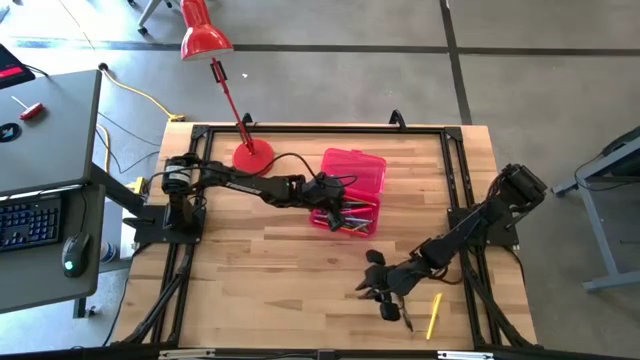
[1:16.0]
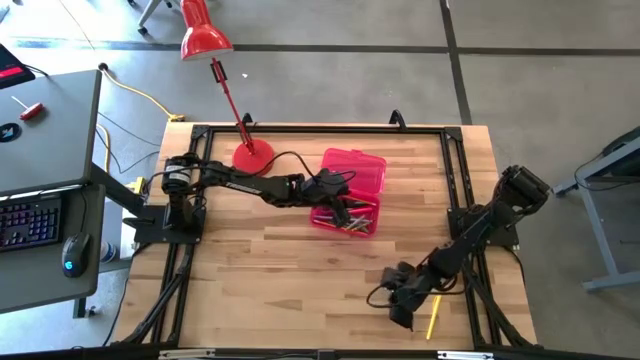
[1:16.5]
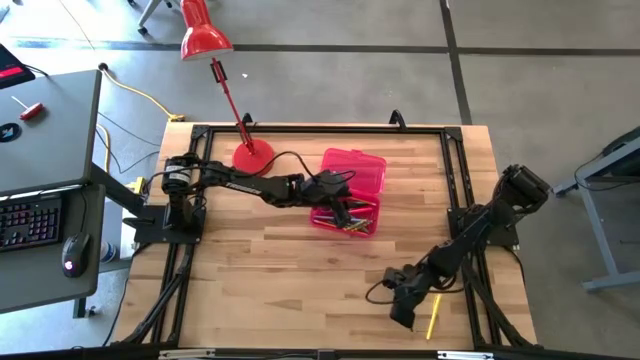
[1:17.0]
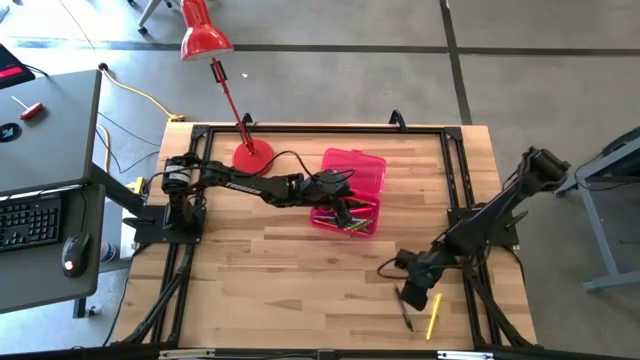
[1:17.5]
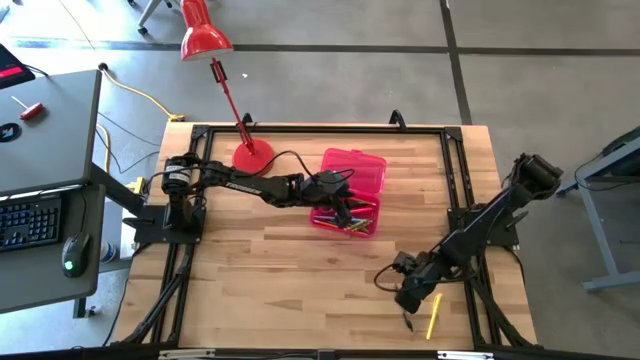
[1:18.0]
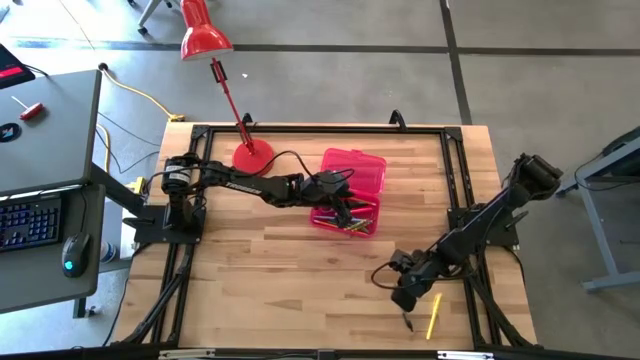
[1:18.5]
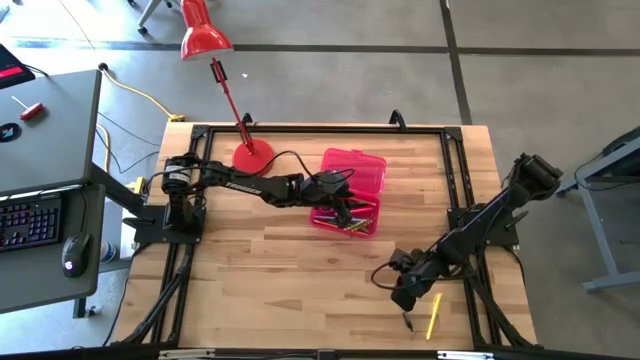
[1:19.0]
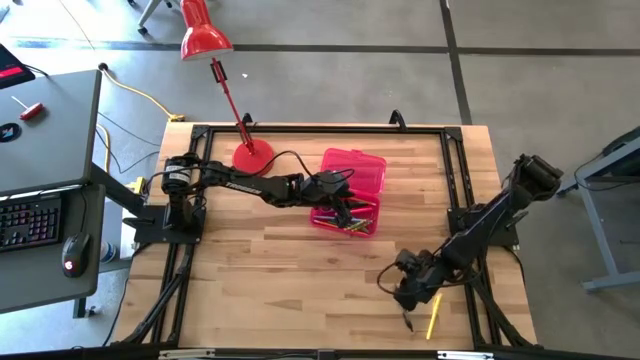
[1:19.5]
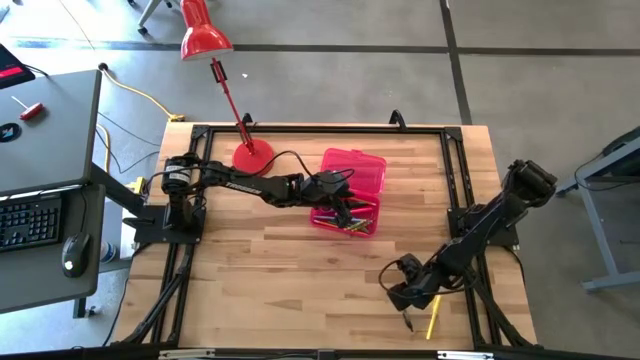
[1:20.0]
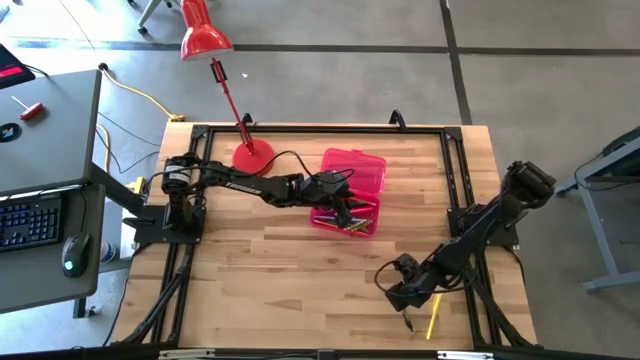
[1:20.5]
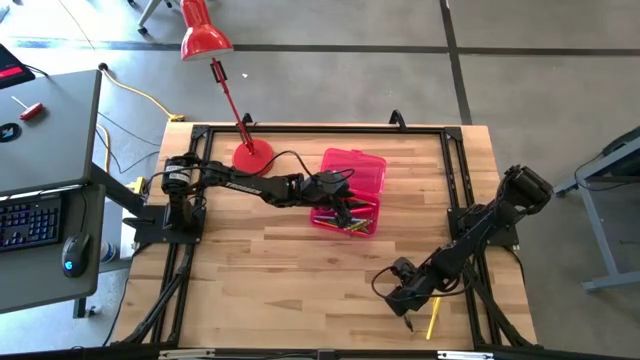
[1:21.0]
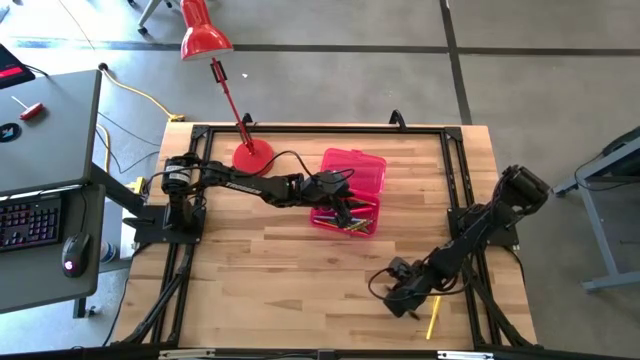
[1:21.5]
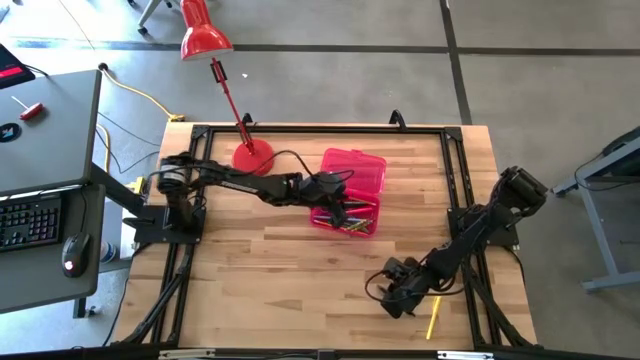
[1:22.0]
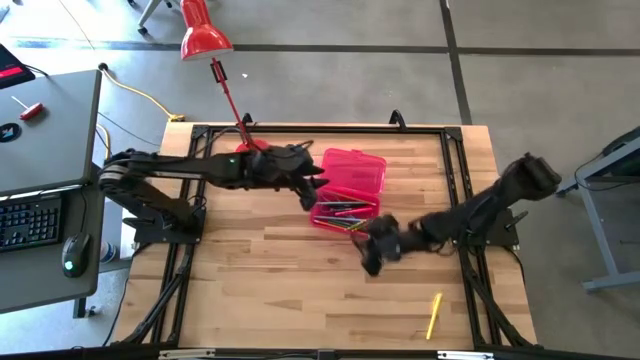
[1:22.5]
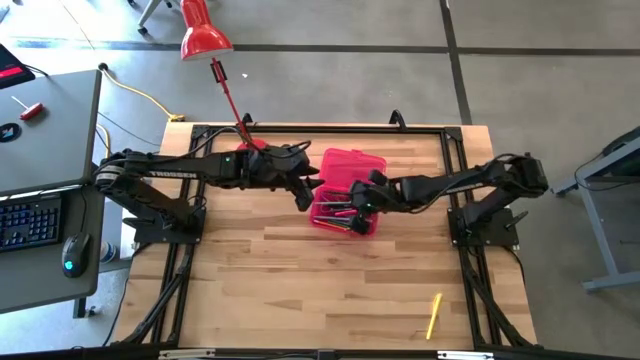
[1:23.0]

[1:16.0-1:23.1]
Task: Pick & place school supplies into a supply box
Put the black pen into the red supply box

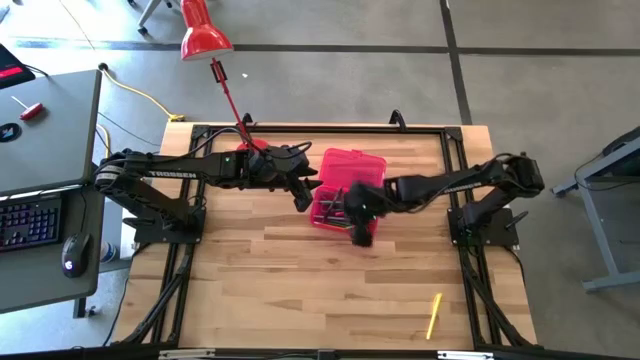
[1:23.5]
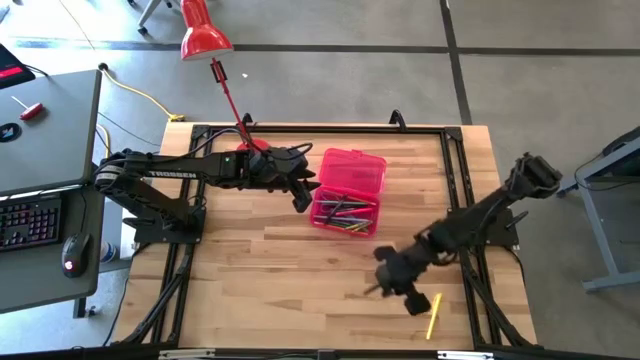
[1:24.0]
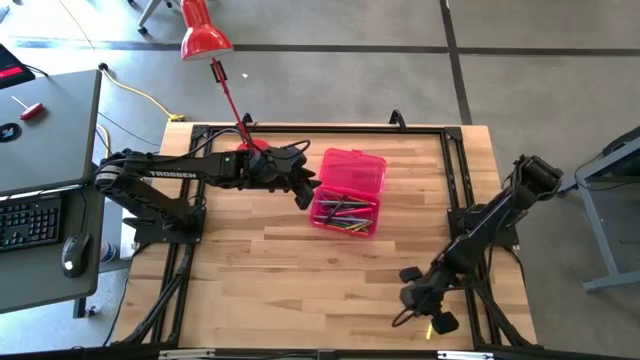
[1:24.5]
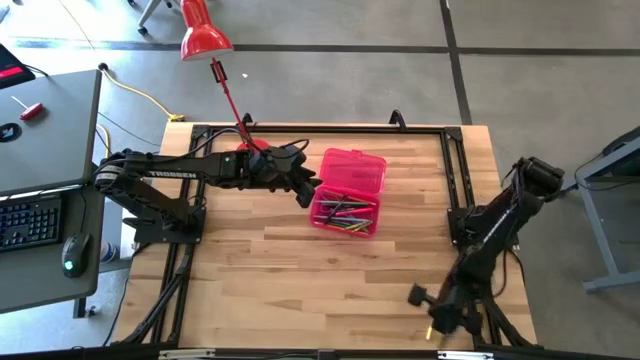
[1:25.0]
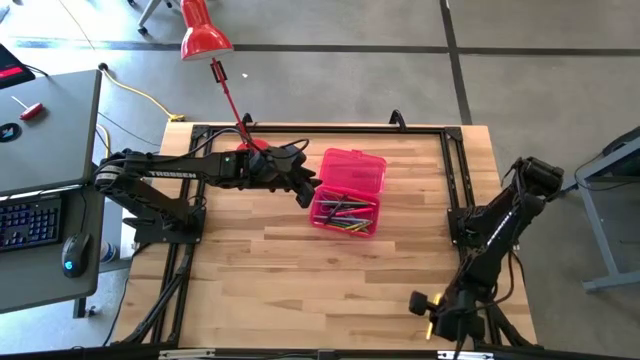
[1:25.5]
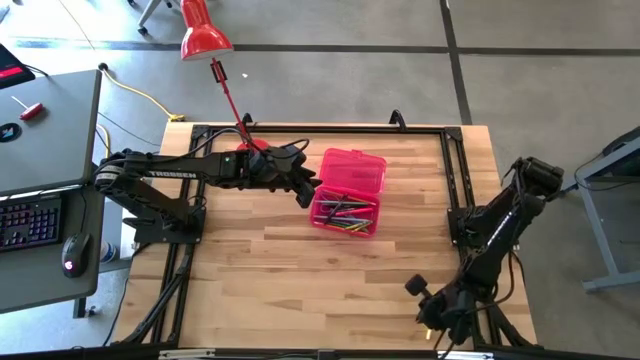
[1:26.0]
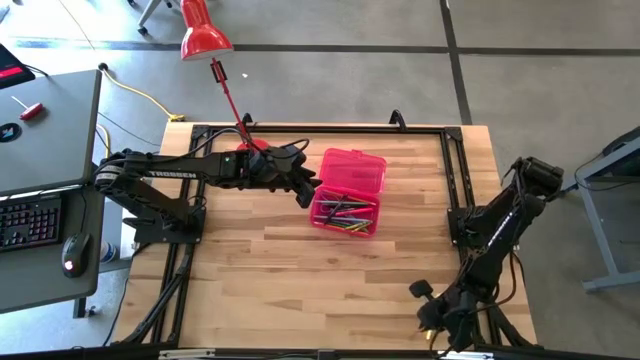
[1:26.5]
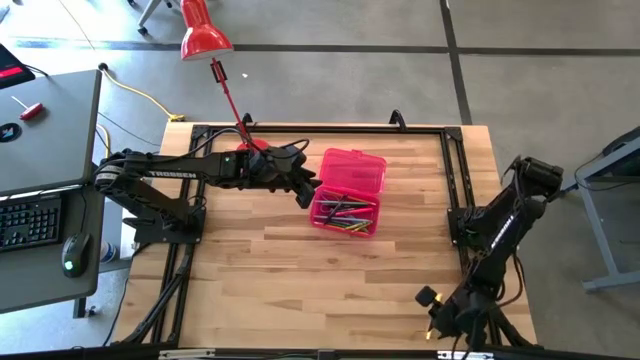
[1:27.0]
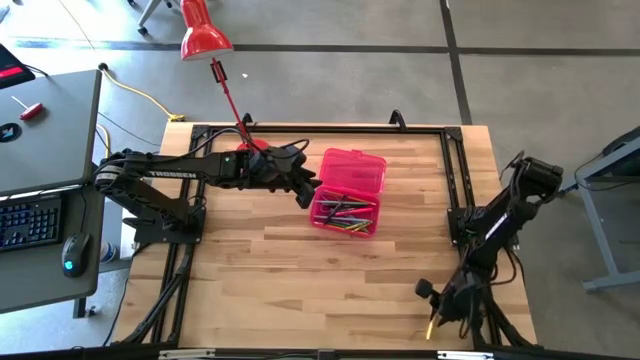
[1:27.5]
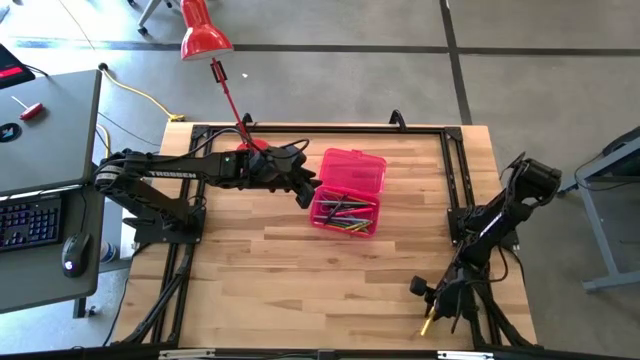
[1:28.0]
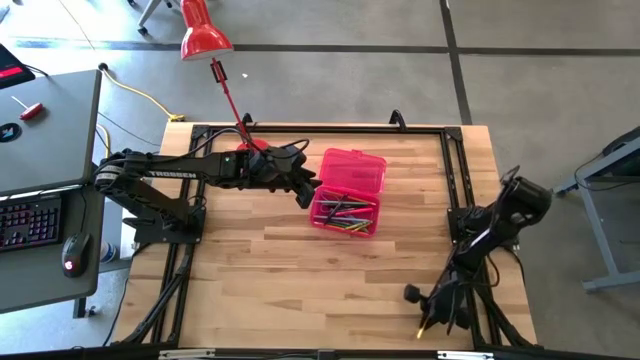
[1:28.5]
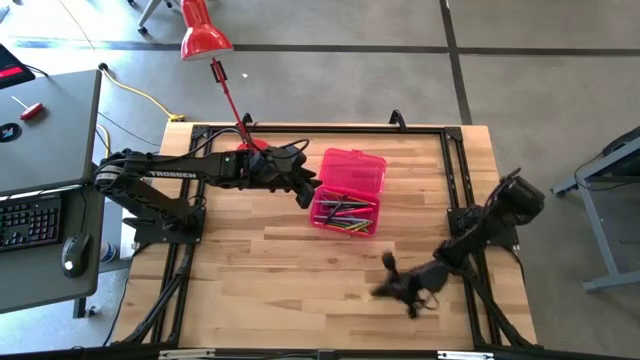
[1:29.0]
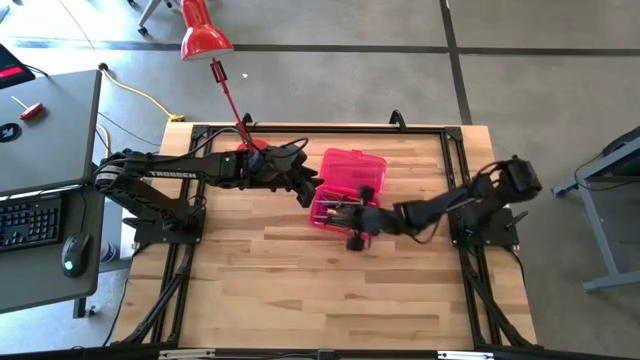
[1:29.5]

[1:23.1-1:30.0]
Put the yellow pen into the red supply box

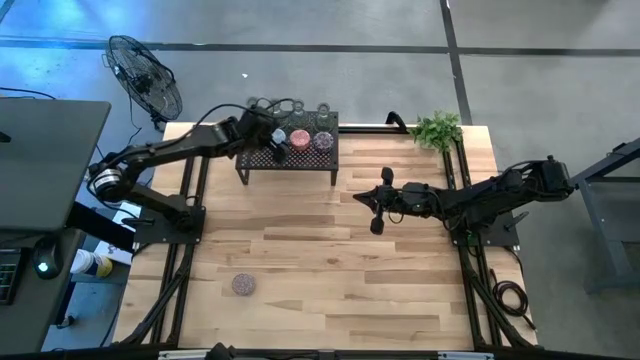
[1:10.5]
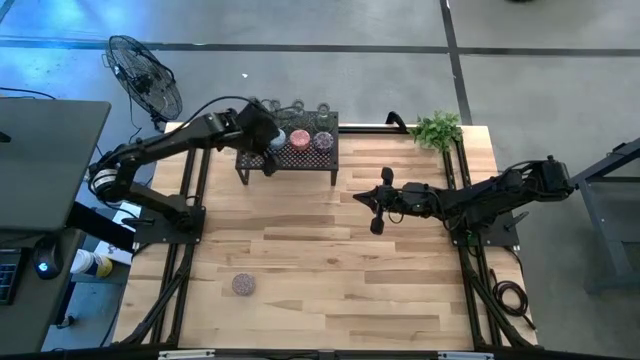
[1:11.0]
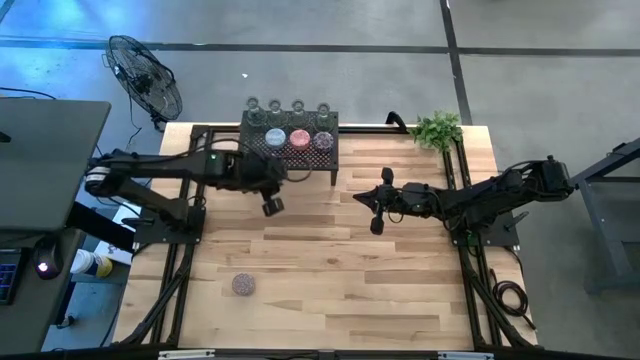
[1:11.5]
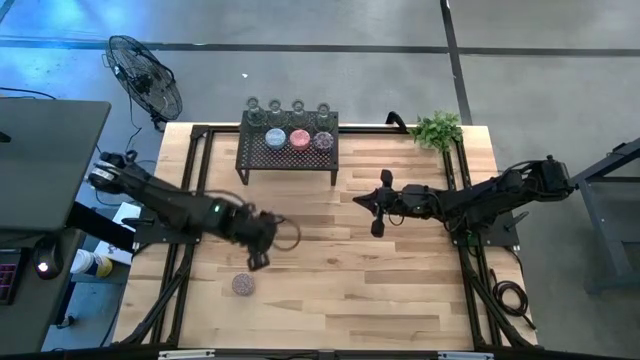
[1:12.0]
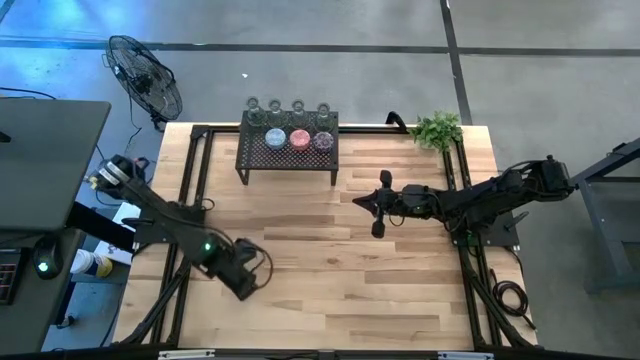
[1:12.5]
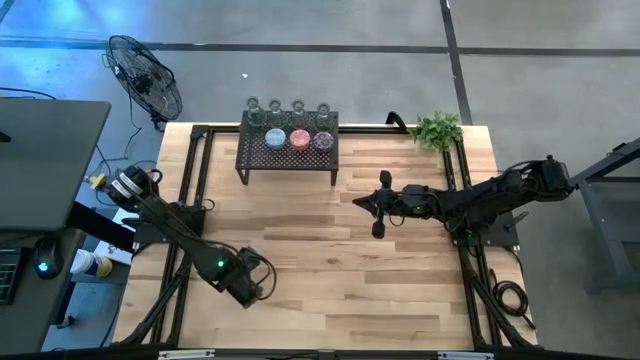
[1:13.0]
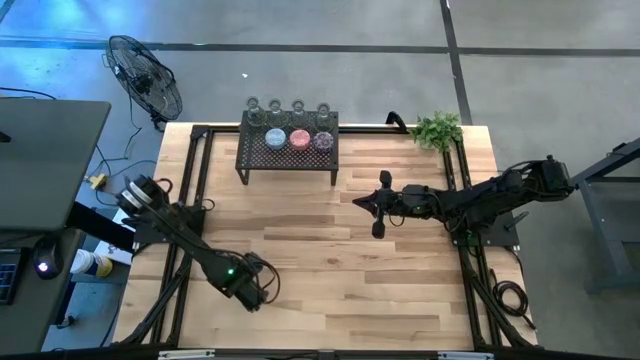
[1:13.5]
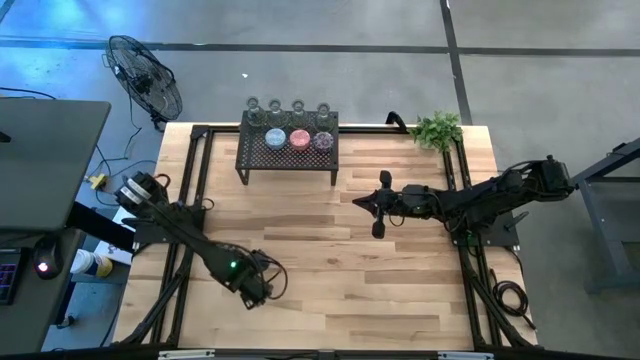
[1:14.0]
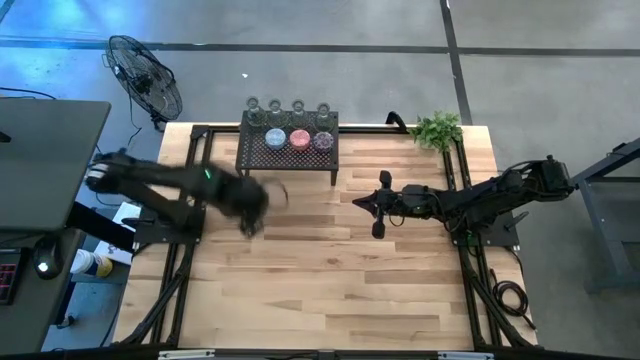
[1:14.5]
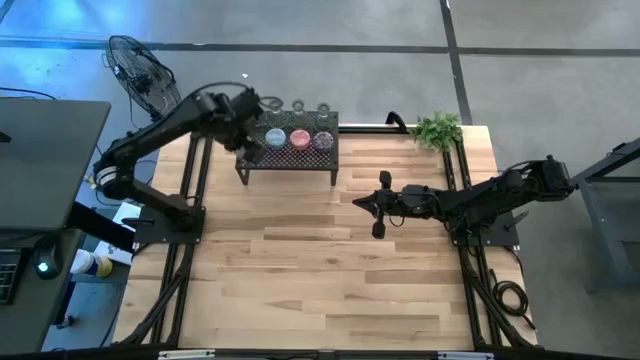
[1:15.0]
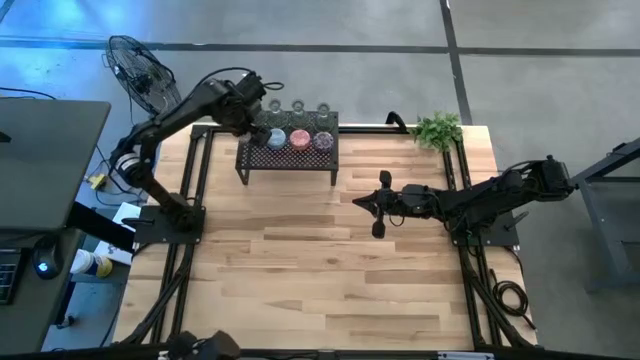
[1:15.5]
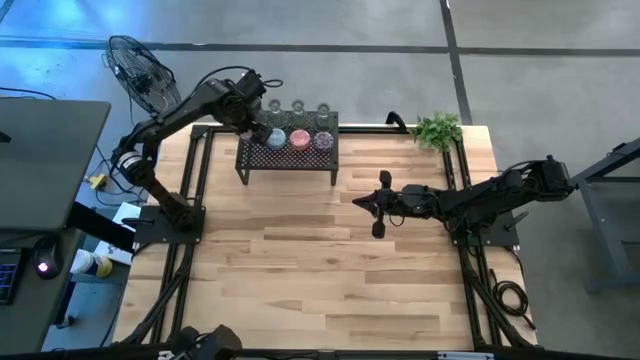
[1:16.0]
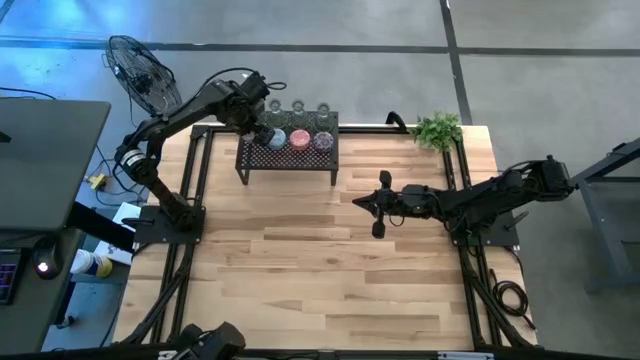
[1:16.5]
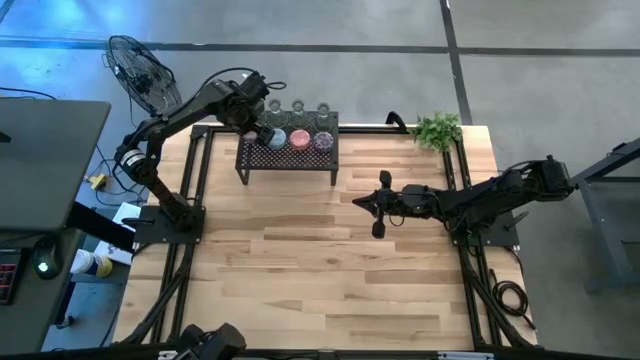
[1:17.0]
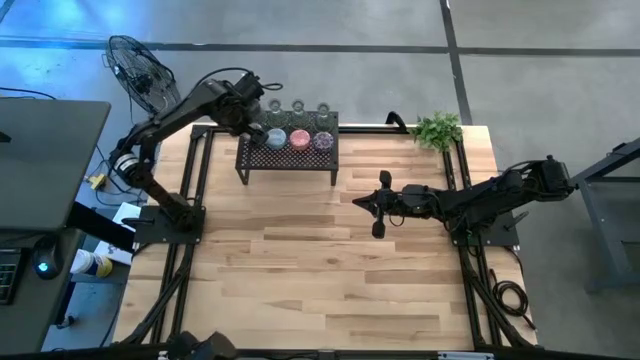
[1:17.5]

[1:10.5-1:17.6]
Task: Pick & Place candle stick holders
Put the red scented candle on the shelf

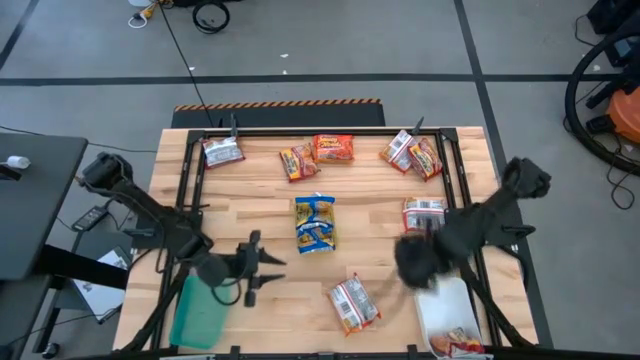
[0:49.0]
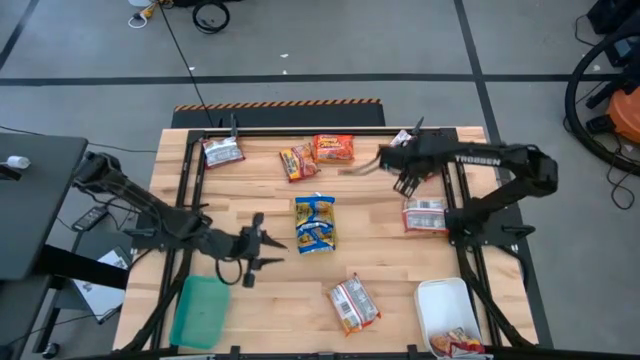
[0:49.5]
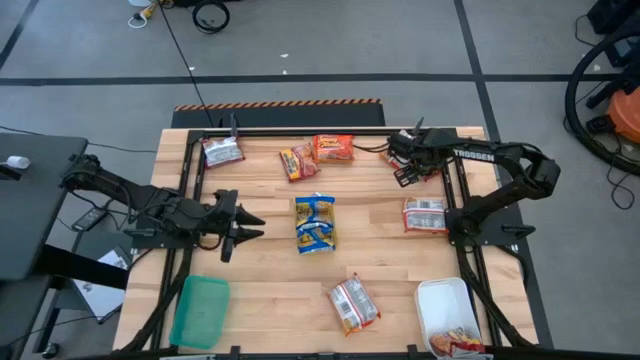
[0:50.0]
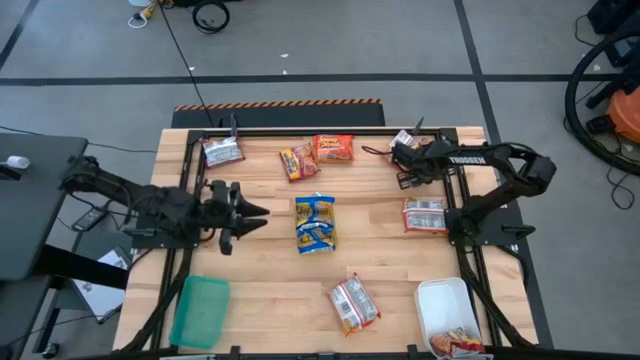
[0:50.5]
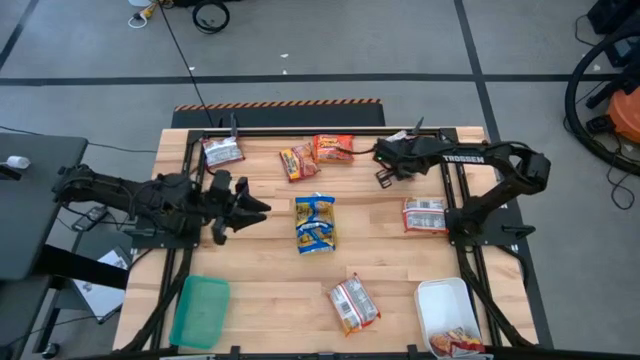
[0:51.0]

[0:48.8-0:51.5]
Task: Sort Maruchan noodles
Put the red noodle pack into the white bin
